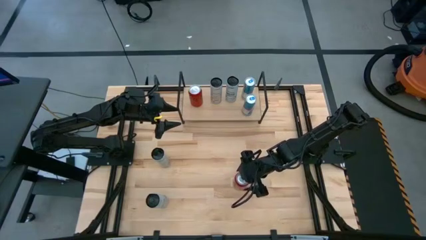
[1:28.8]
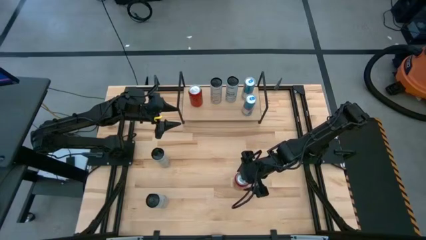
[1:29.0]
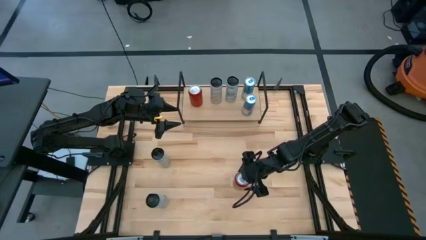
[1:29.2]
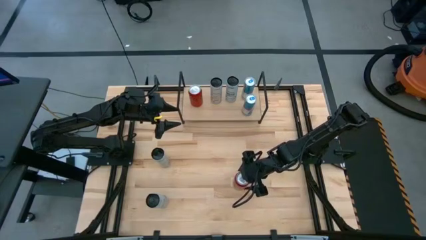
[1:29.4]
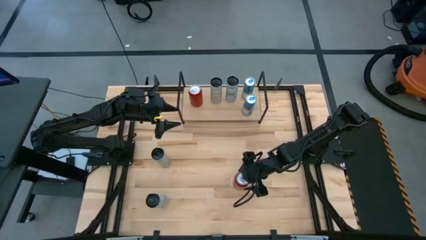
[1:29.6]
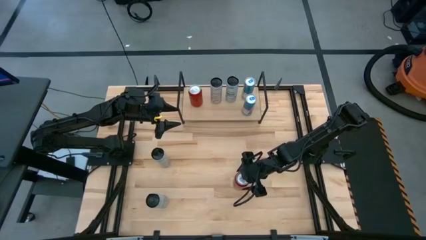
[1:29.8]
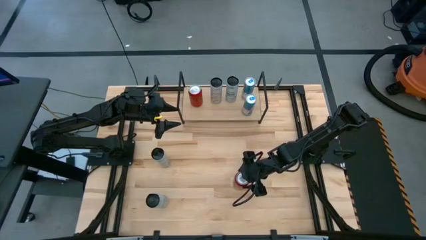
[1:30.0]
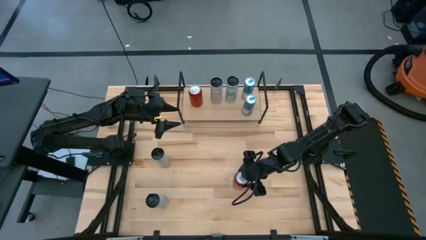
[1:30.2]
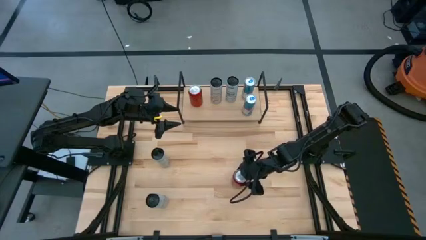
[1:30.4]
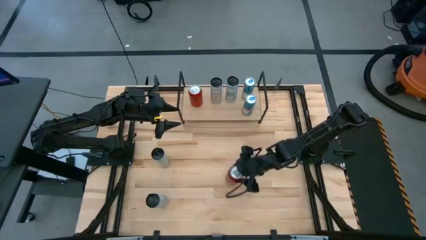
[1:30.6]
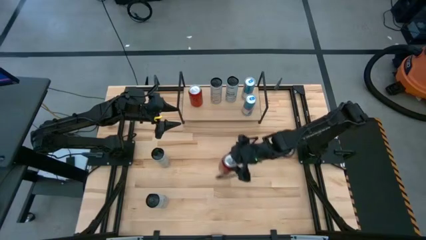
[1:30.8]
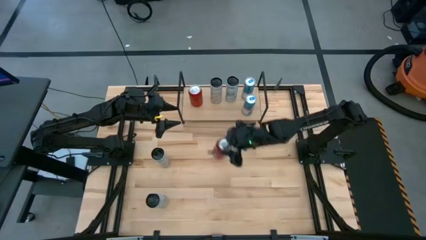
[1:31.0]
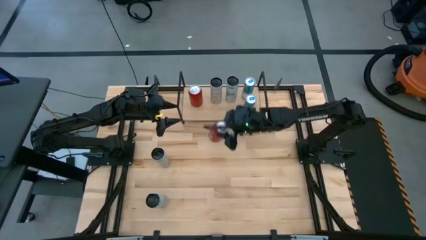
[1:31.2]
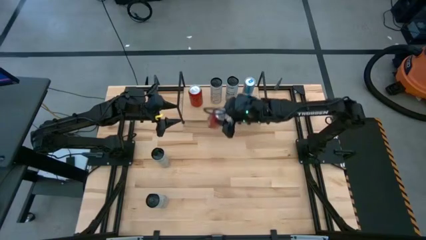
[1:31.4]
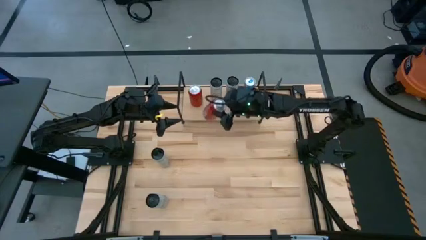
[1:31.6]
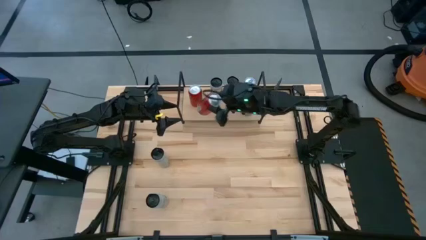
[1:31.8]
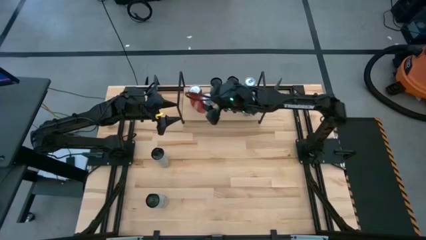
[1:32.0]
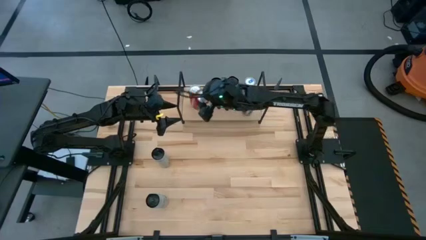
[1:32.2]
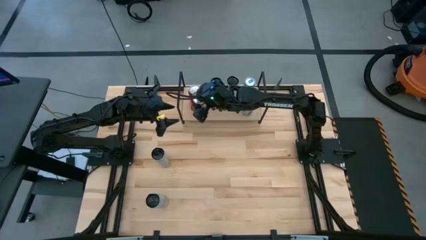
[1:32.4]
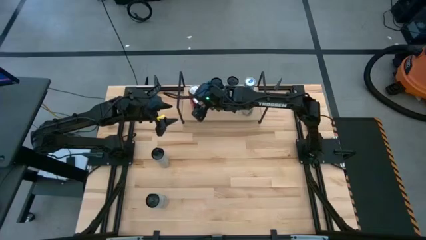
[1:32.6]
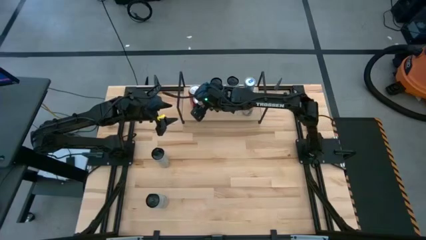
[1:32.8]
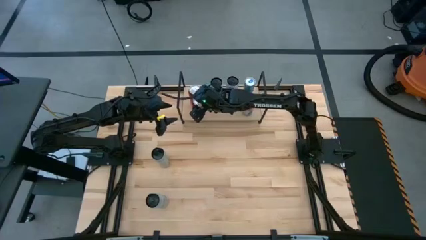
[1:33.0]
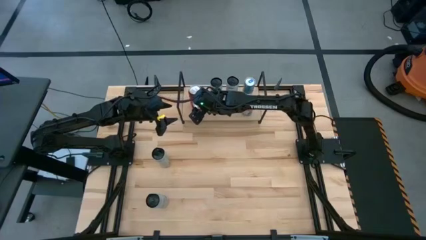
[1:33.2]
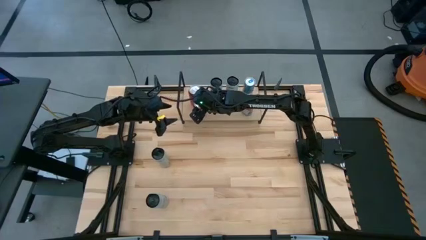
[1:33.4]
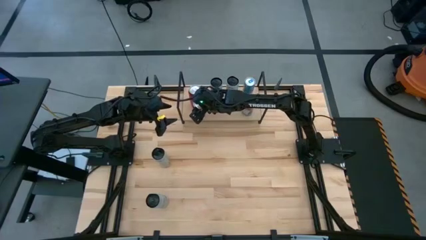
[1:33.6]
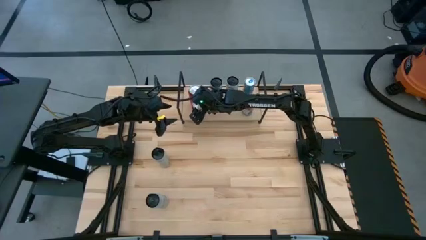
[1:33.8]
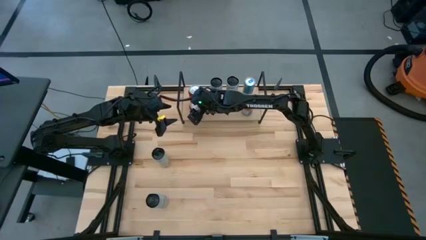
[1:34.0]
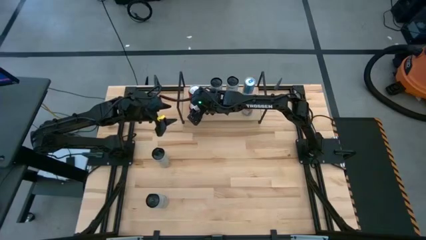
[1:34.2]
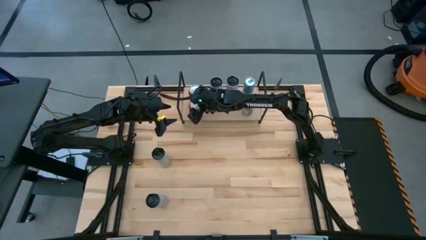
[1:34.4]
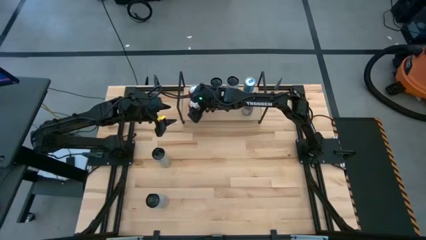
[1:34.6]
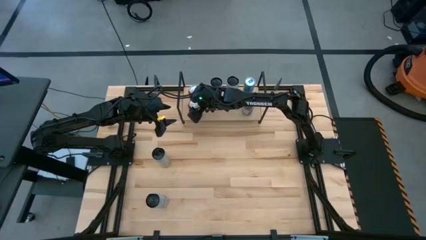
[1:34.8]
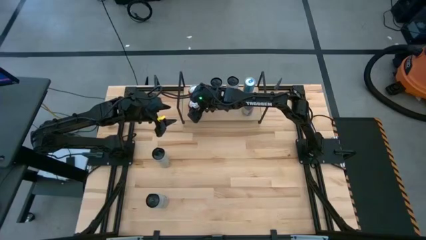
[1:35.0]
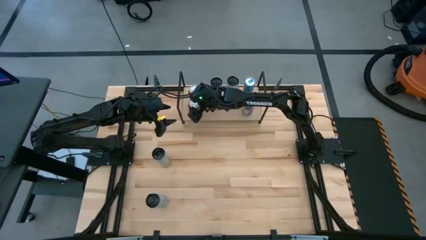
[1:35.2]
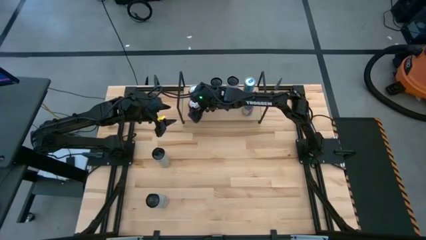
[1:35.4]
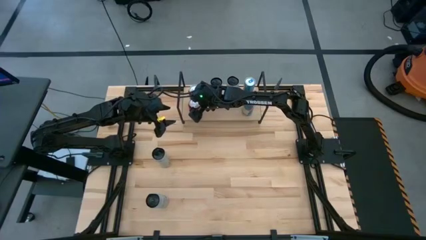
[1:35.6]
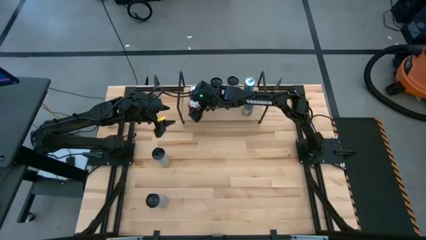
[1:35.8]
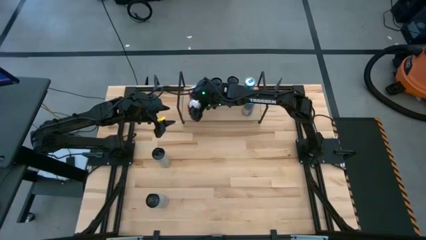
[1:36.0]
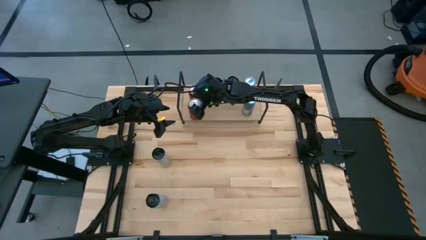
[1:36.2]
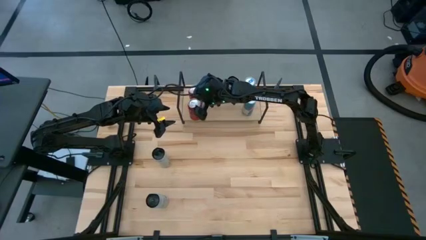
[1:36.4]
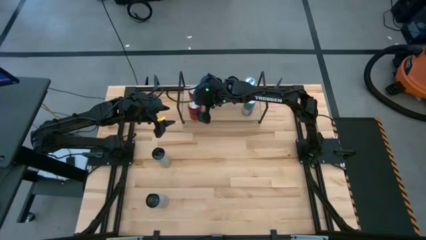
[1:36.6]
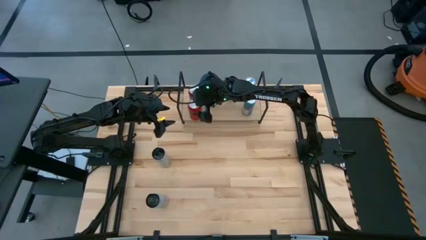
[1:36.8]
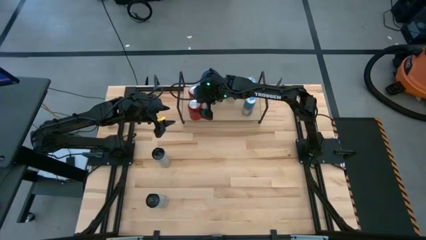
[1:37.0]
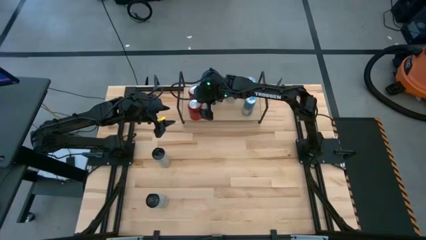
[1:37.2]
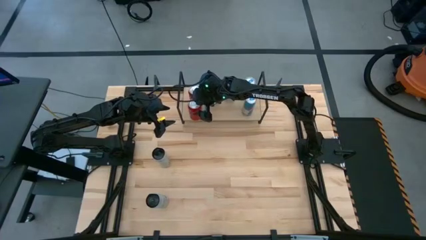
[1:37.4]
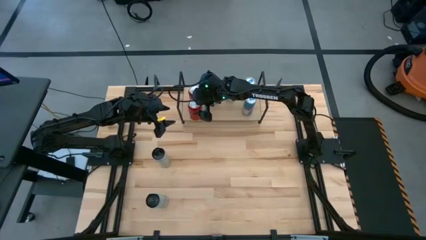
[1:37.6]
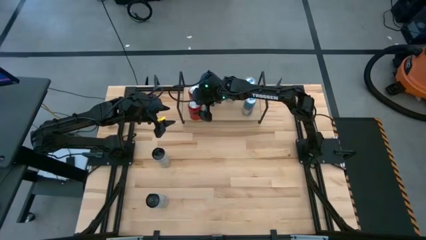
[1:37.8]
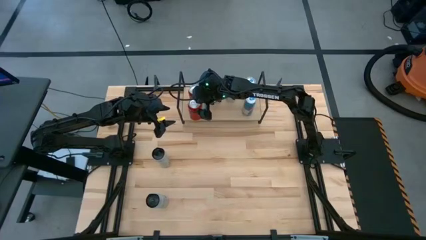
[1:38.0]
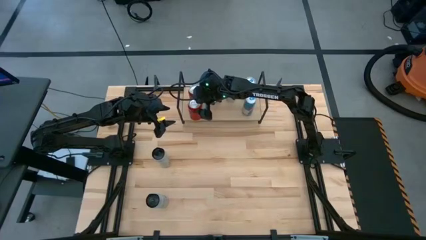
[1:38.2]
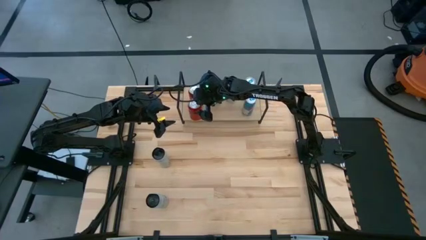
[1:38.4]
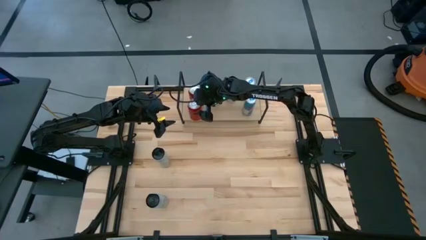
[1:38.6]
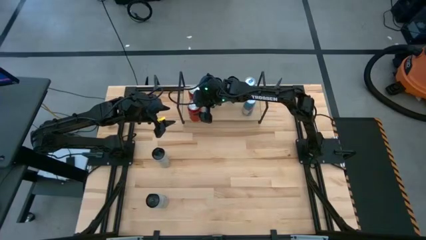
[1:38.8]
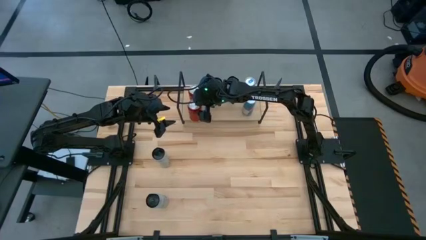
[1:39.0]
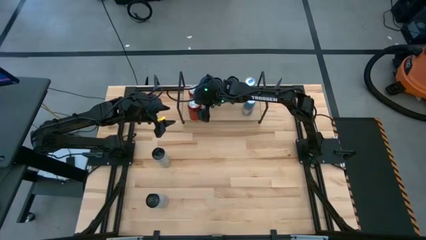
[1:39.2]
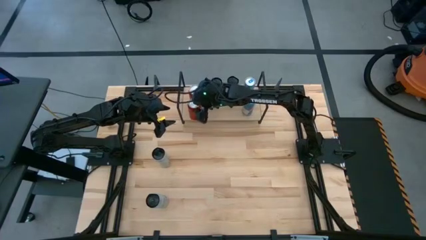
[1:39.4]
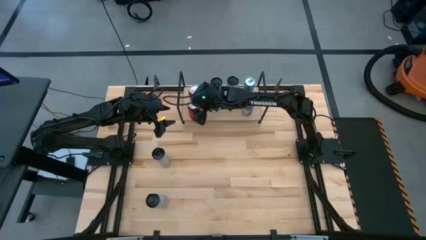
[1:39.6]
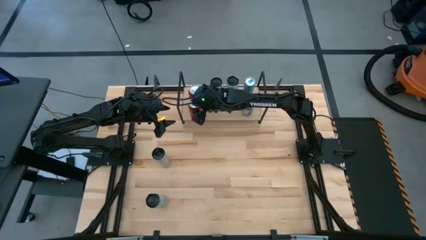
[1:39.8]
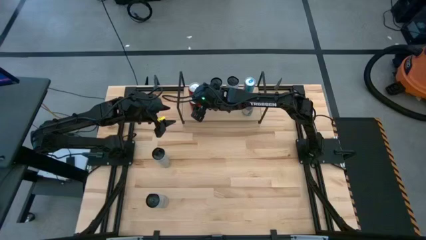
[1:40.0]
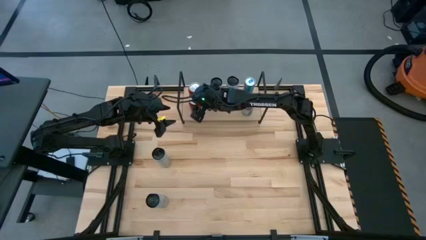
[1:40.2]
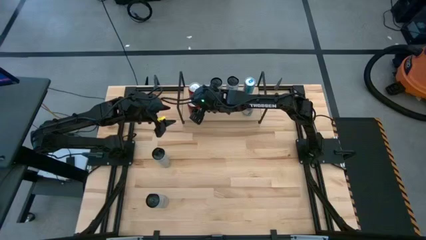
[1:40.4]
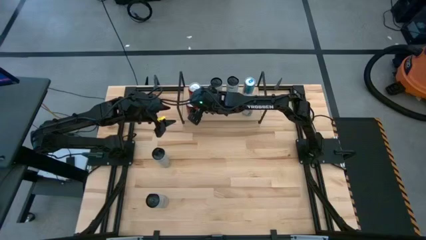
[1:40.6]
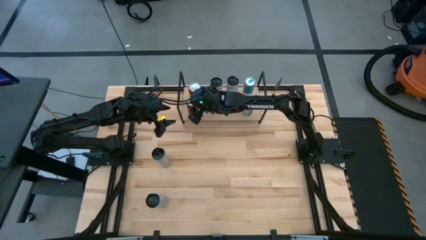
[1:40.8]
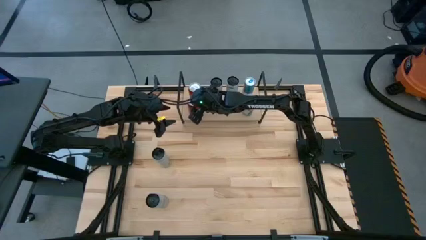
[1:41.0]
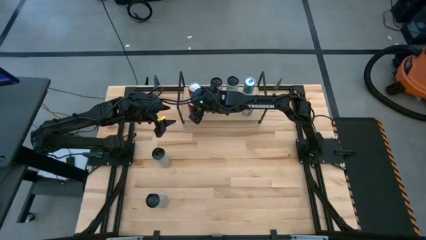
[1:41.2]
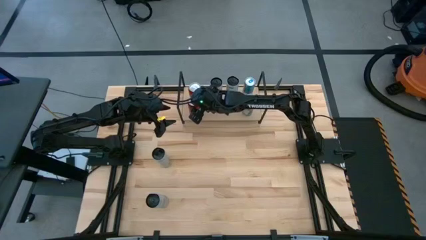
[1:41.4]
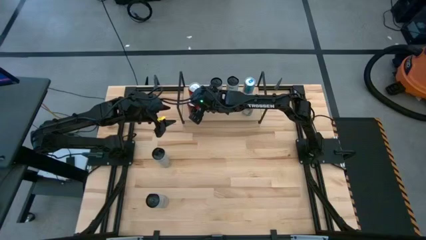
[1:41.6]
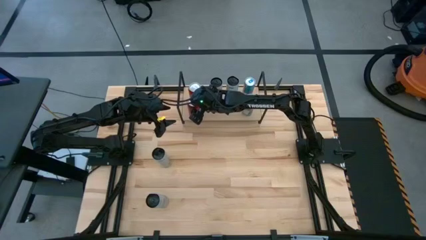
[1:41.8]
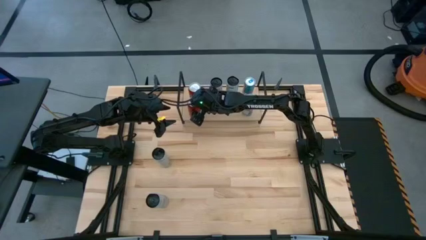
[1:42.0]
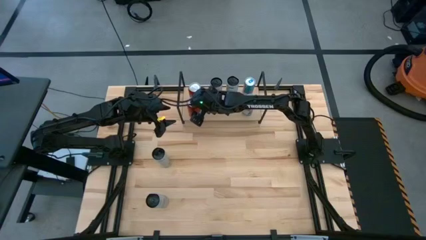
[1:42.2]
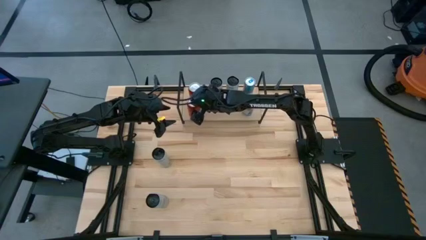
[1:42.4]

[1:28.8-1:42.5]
Task: Place canned beverage on shelf
Put the red soda can on the shelf
